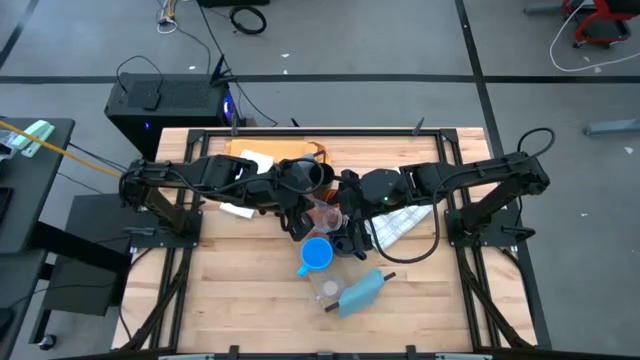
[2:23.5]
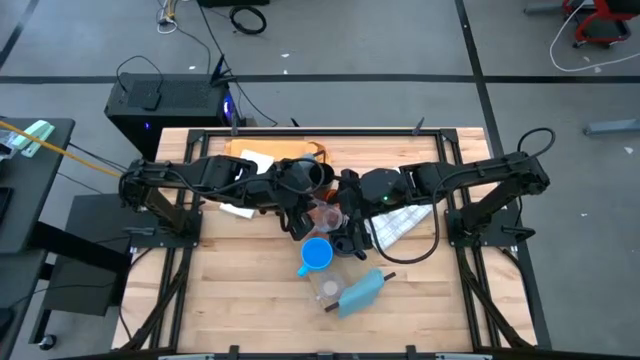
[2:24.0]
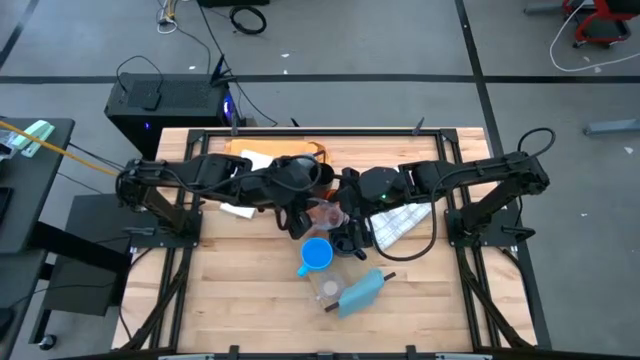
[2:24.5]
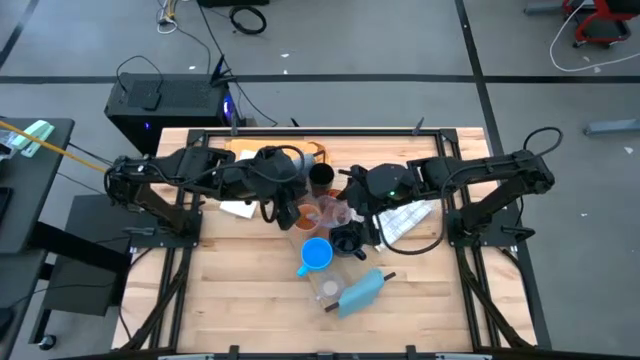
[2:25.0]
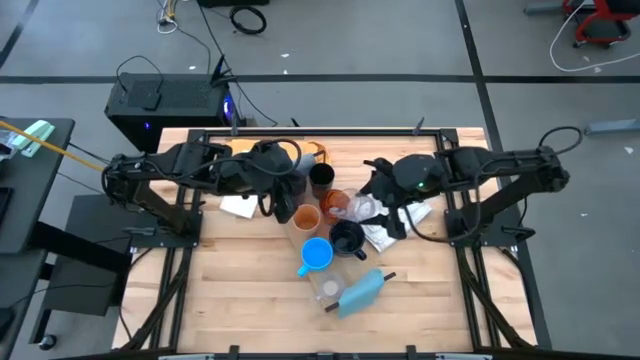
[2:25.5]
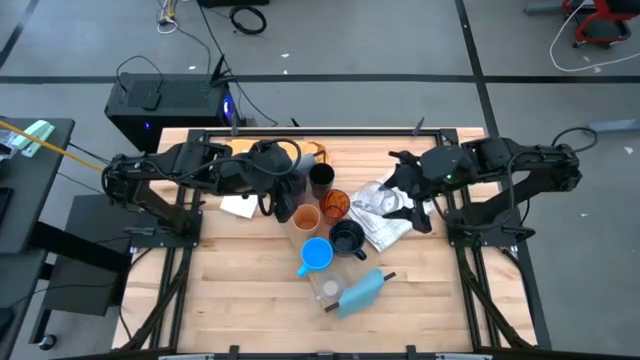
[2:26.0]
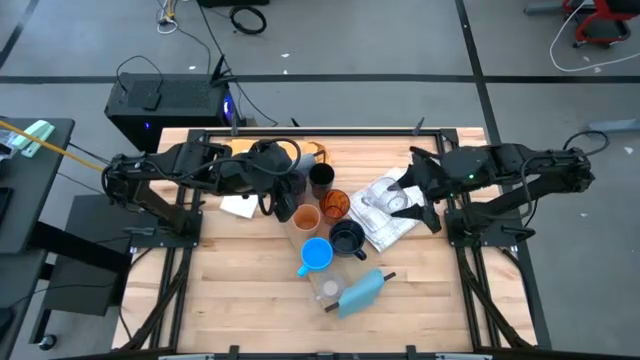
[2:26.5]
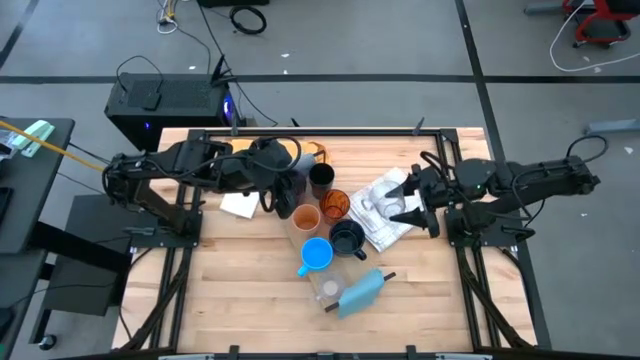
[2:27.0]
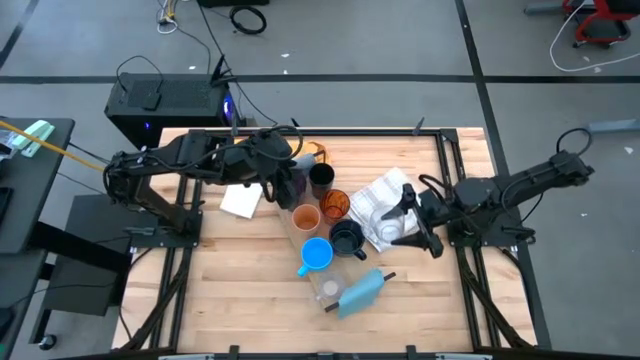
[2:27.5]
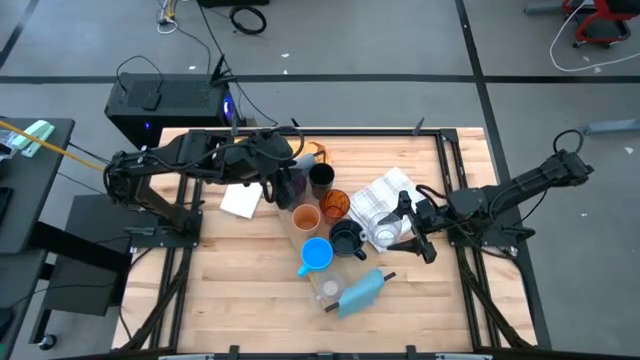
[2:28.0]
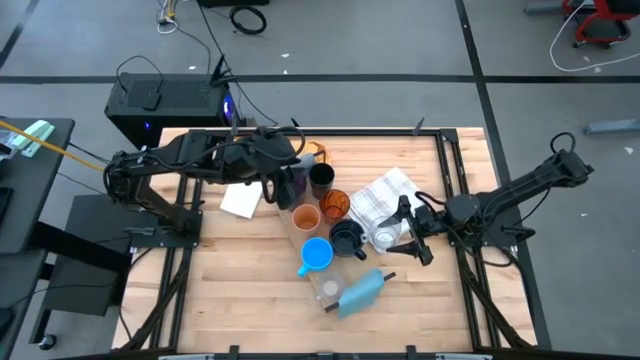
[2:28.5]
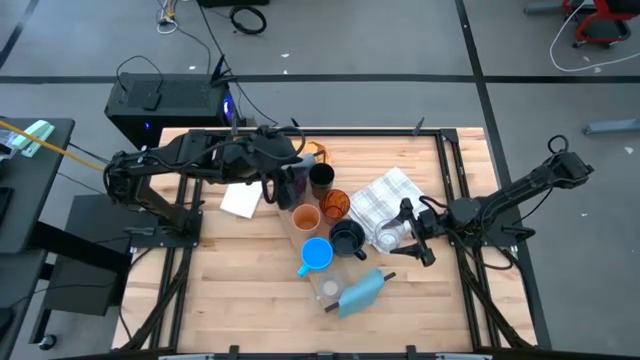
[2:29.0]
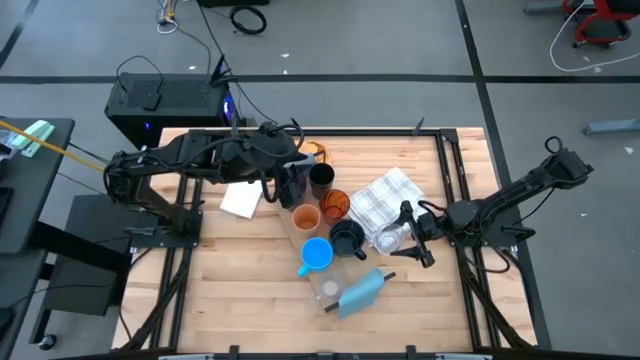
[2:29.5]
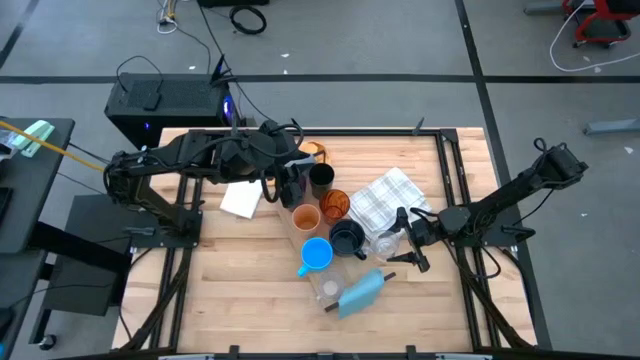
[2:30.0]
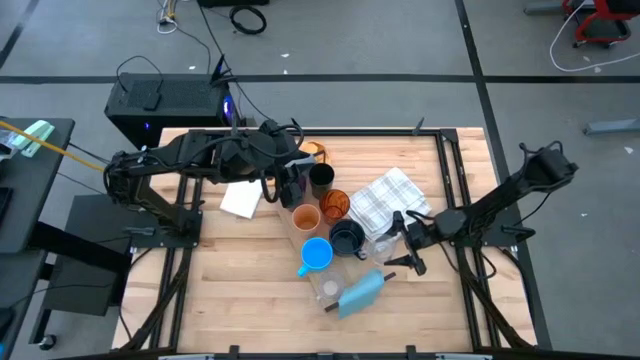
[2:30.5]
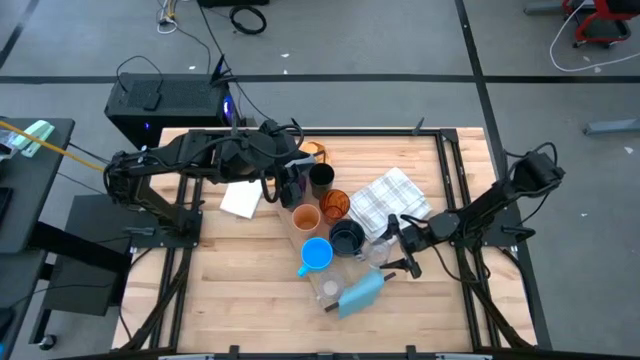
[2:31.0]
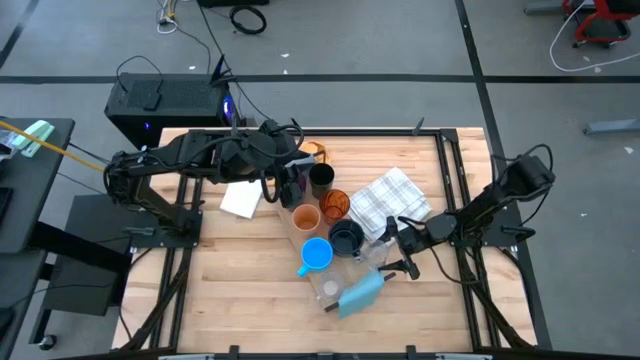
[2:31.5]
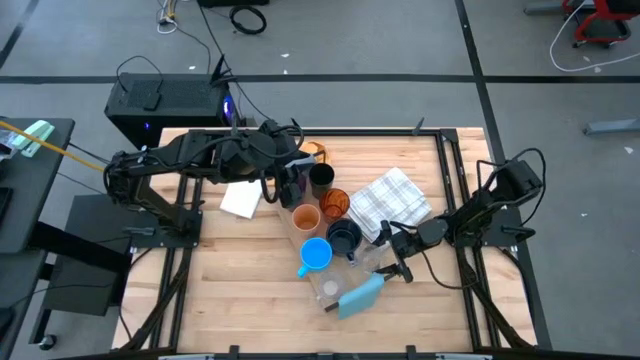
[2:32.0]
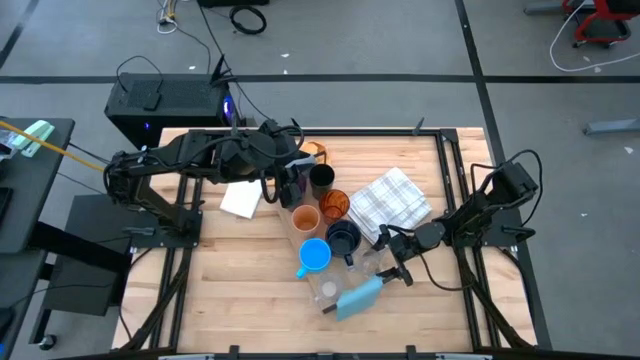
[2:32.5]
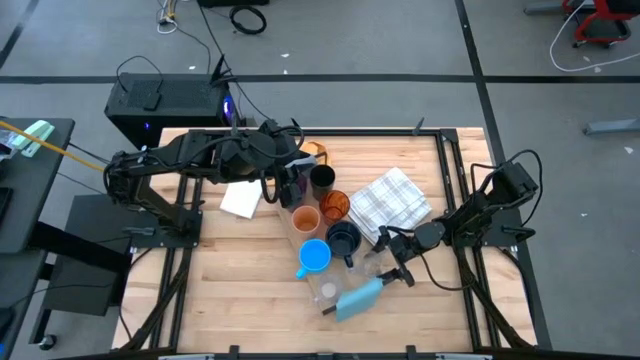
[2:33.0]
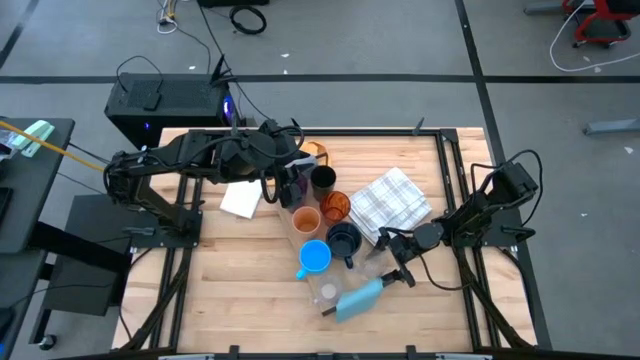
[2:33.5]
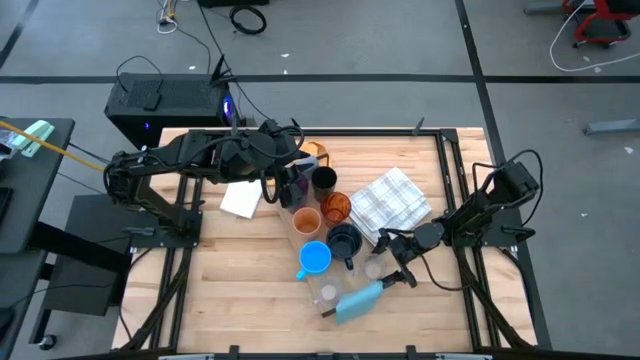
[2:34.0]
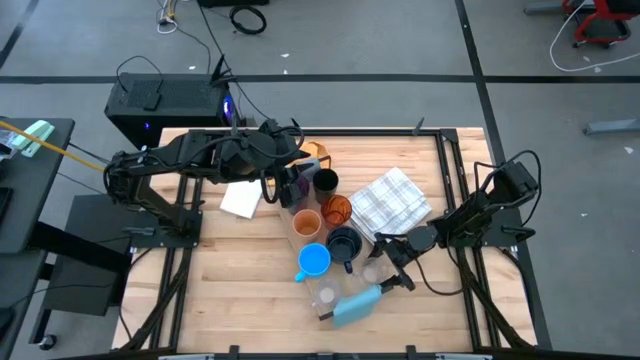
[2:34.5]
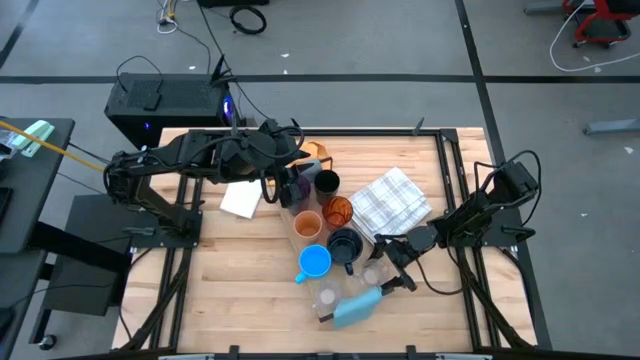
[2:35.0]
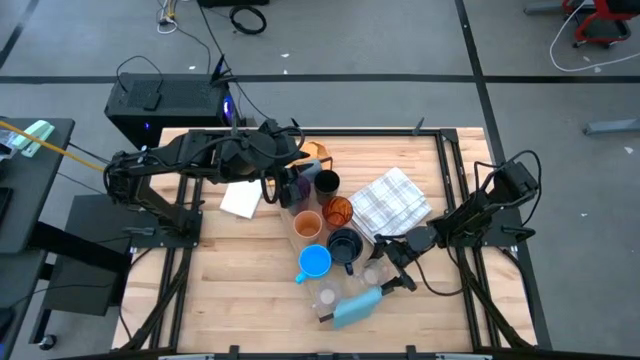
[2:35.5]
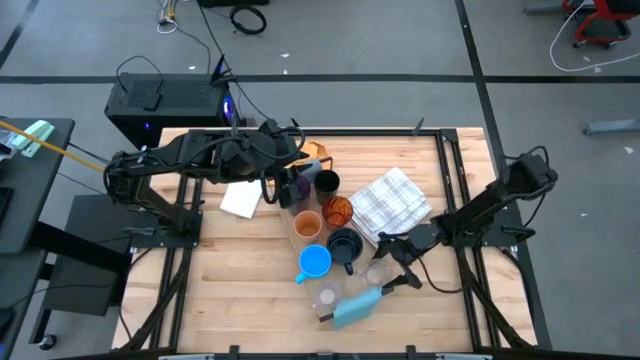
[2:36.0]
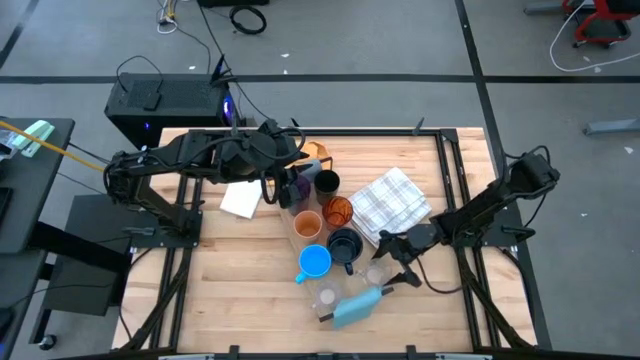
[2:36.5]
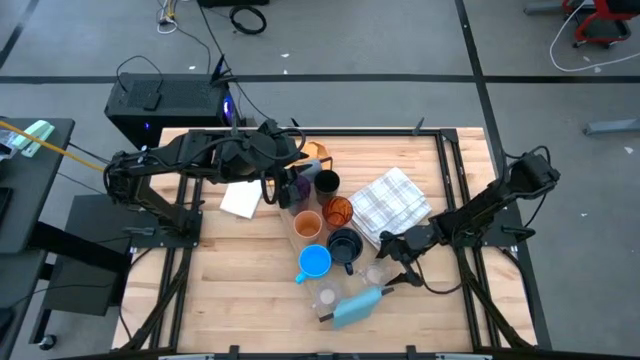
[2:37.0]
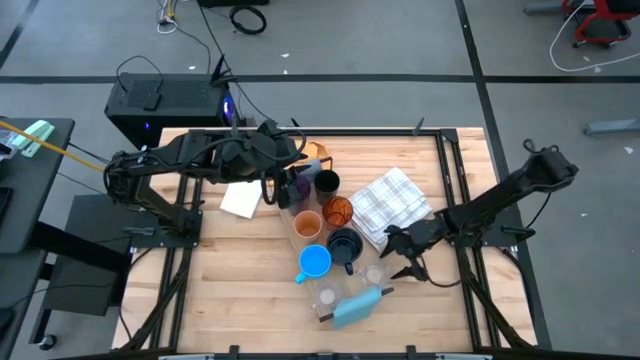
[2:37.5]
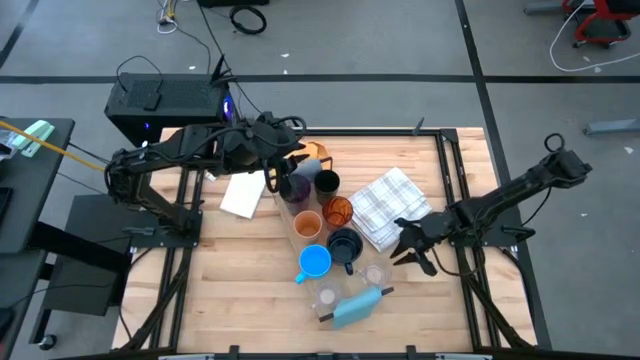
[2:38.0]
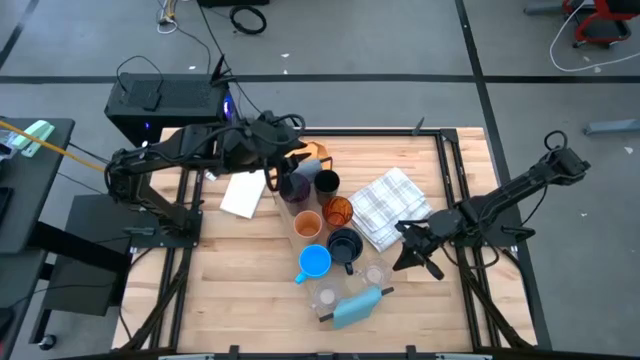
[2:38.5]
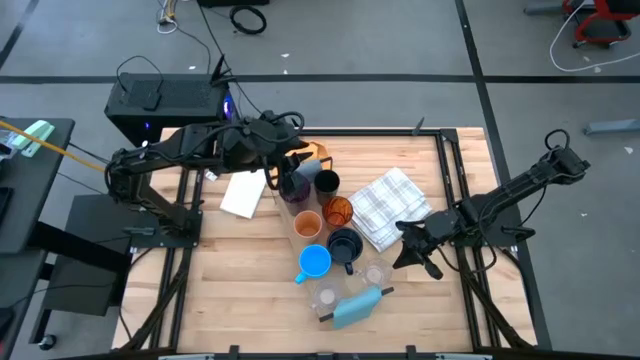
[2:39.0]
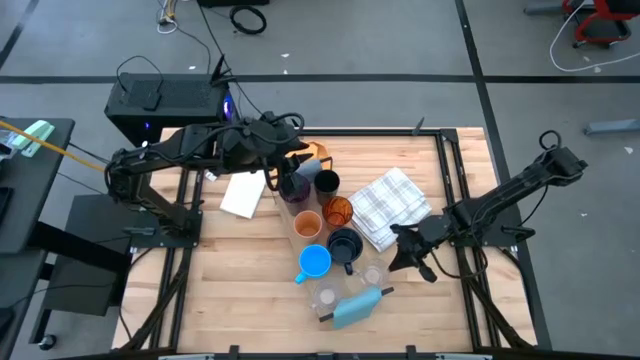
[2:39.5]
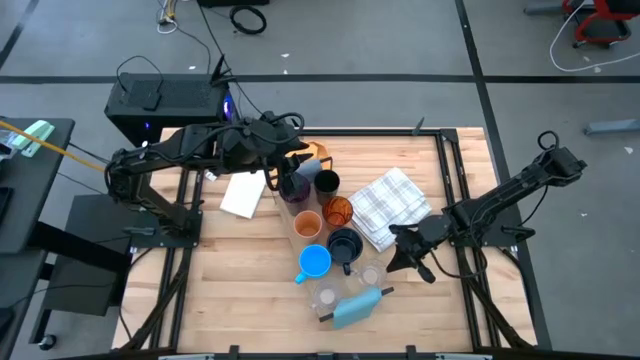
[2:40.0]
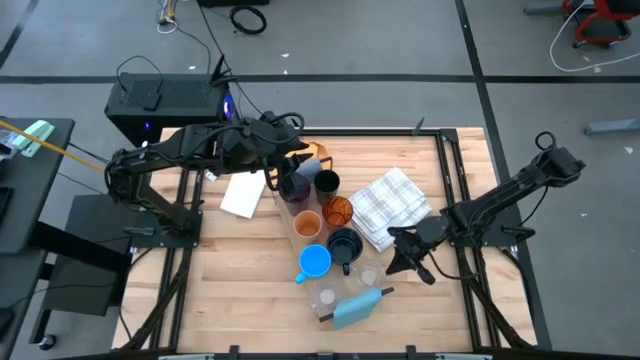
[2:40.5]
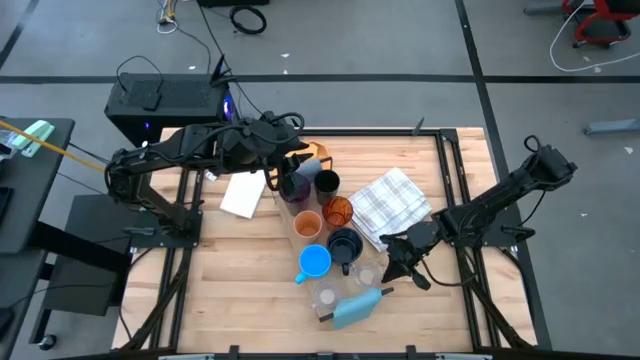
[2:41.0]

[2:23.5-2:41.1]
Task: Stack small to large cups/mugs on shelf
Put the transparent mug on the shelf

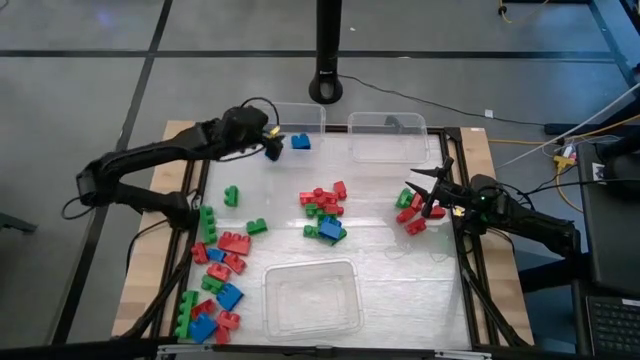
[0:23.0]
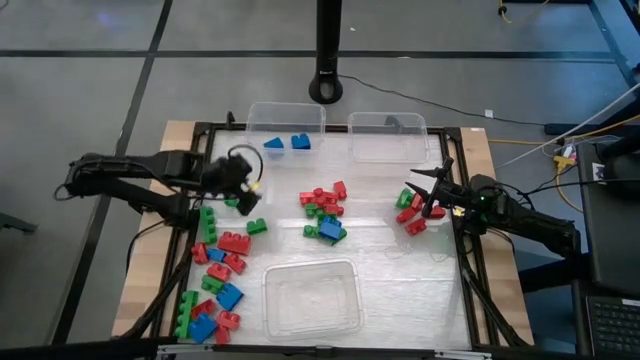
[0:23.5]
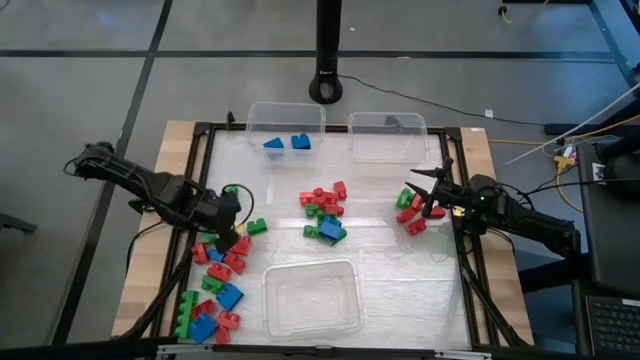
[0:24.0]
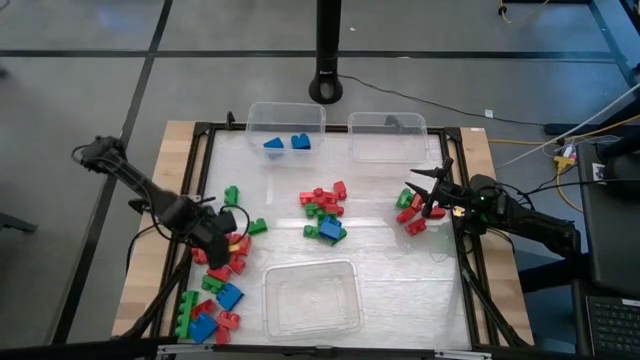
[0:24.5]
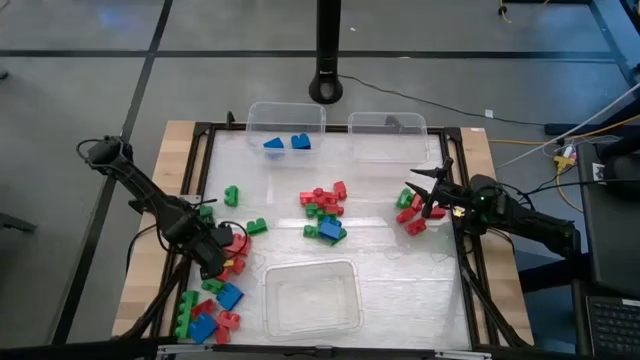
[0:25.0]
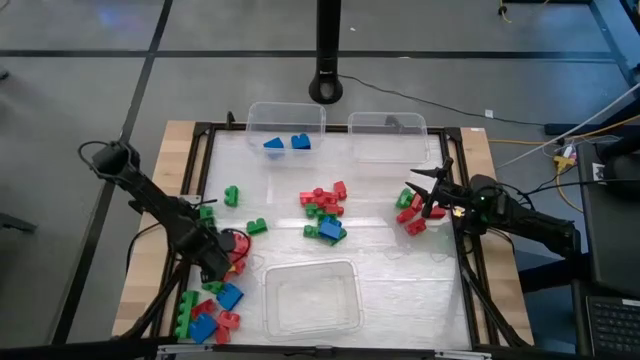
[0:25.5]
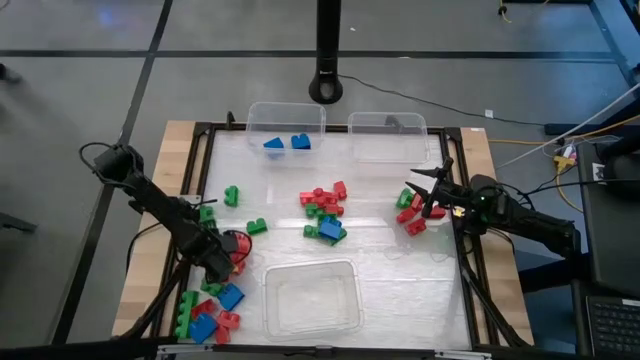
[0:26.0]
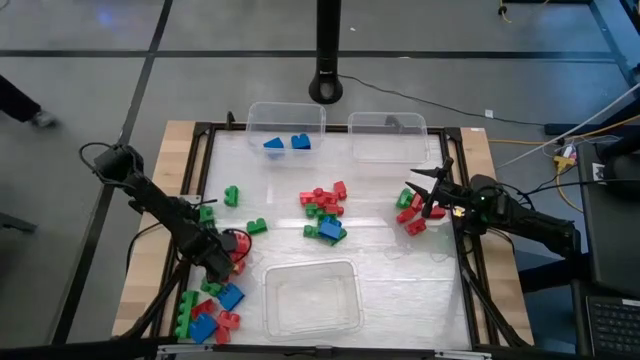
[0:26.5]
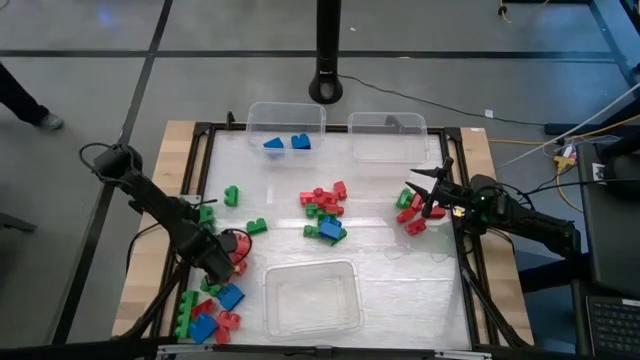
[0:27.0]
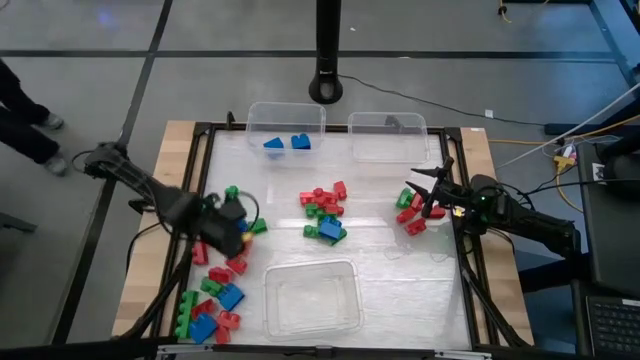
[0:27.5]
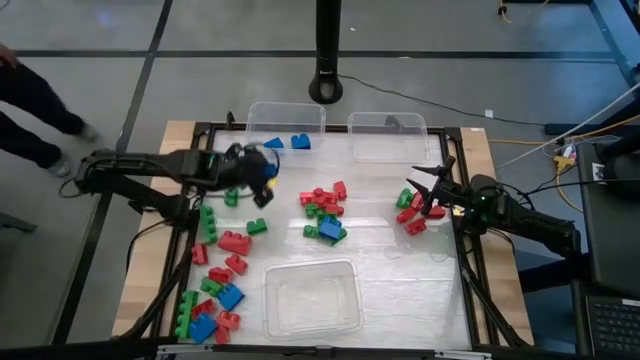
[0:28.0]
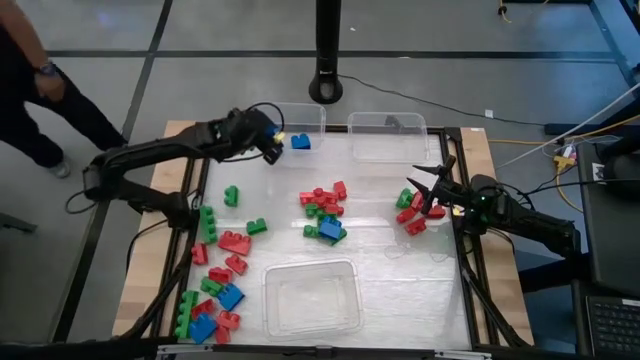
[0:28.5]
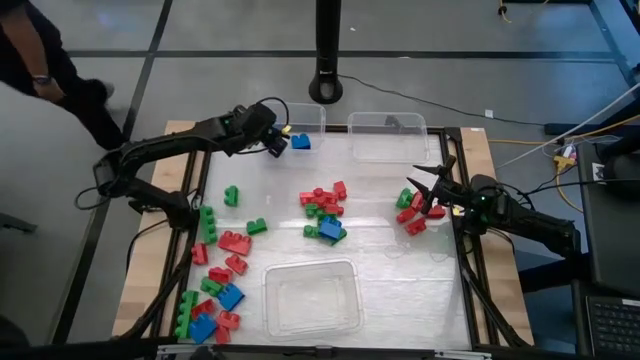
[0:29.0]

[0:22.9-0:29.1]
Task: Sort blocks
Put the blue game piece into the top left transparent bin
